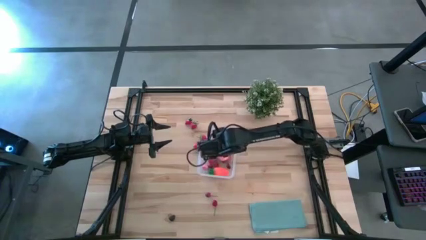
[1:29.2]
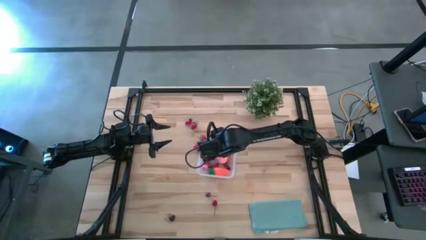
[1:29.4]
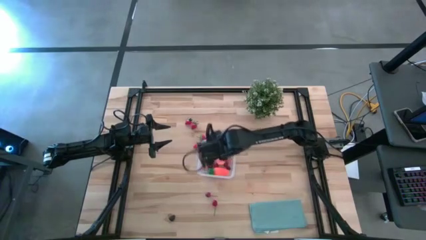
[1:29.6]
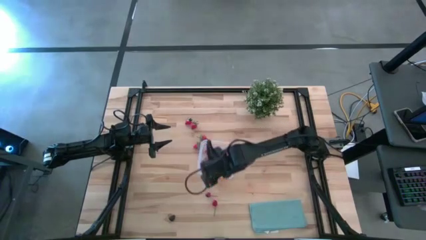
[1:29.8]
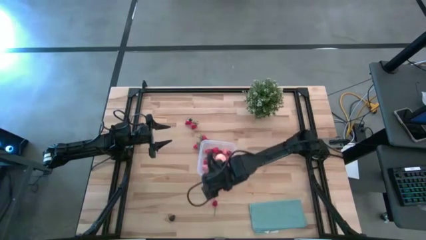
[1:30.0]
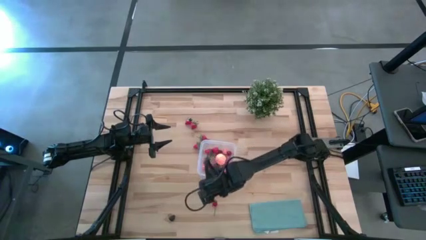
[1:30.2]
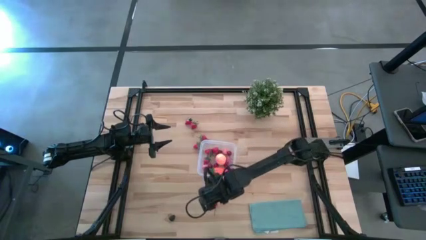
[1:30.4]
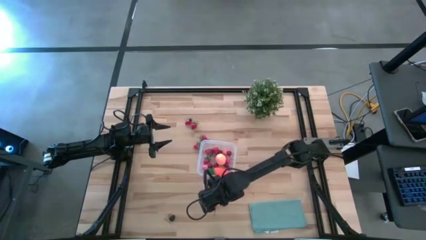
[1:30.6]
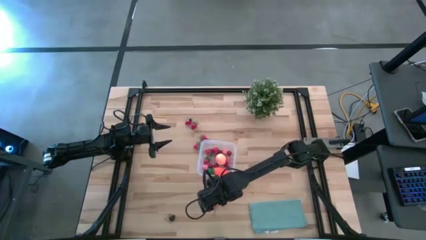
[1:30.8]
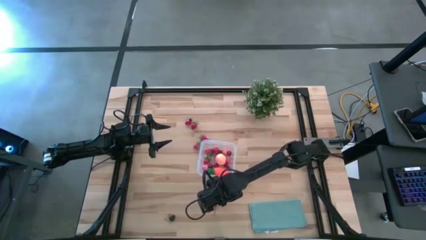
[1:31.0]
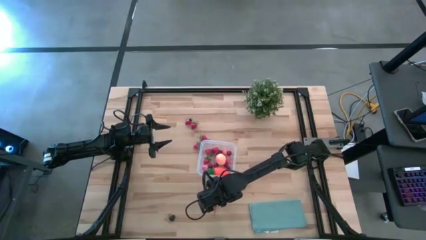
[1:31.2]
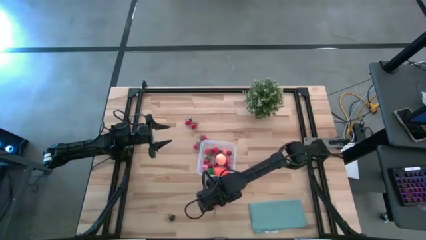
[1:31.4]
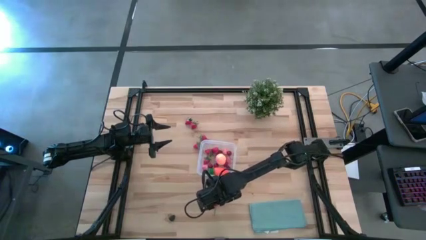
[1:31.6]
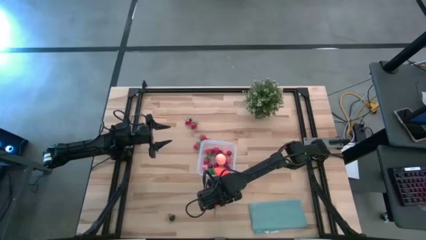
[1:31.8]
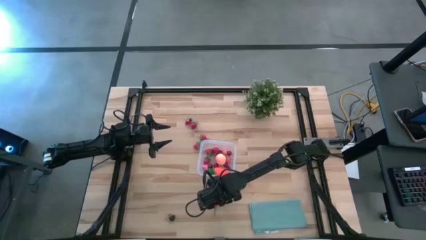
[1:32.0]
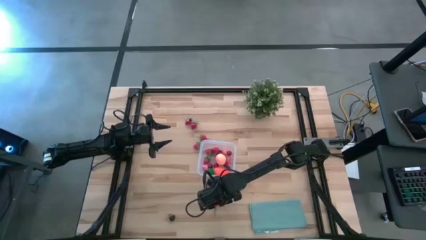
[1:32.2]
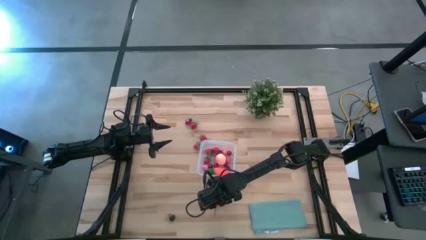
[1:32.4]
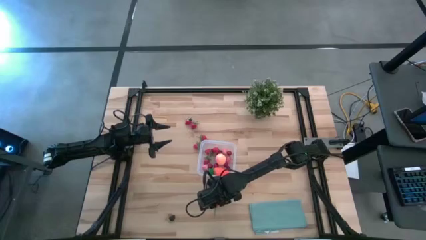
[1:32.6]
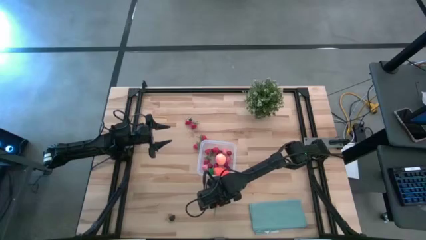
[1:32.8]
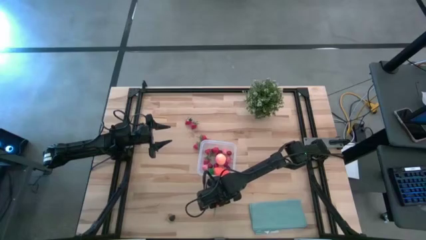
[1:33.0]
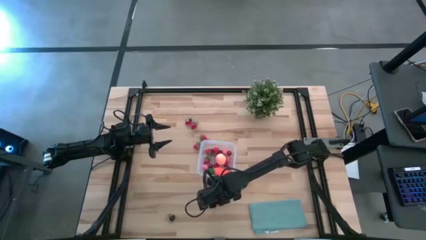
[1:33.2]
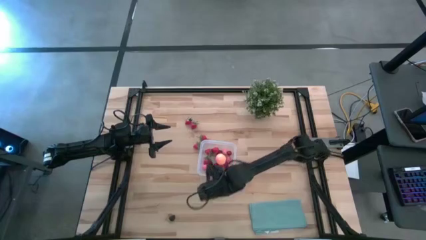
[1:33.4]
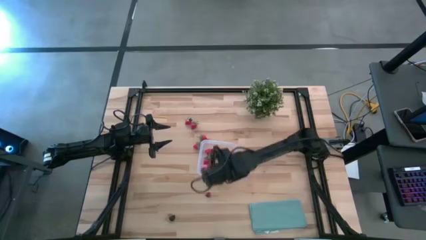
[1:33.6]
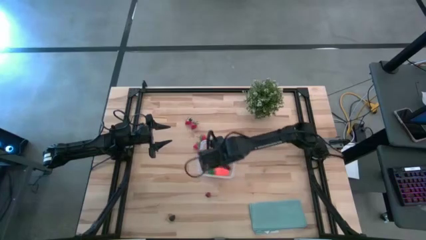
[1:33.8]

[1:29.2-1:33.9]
Task: Pick and placing Produce into tupperware
Put the cherry into the transparent bin

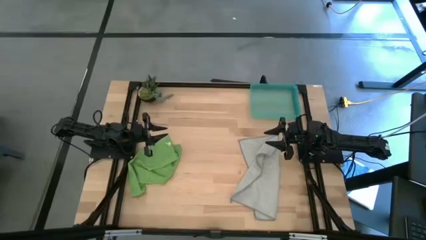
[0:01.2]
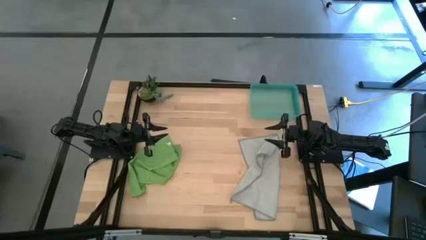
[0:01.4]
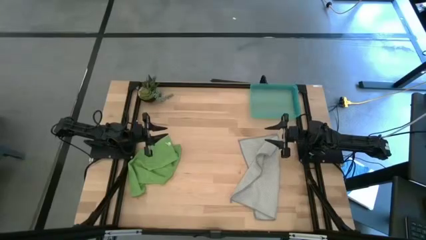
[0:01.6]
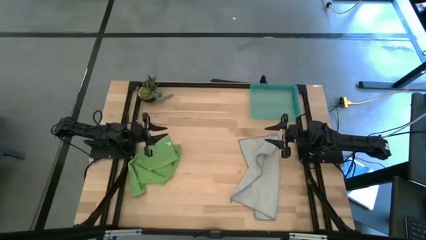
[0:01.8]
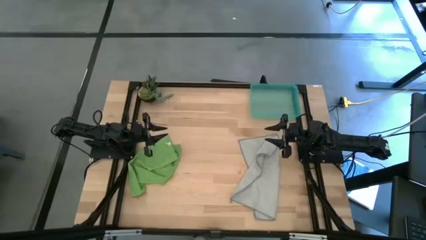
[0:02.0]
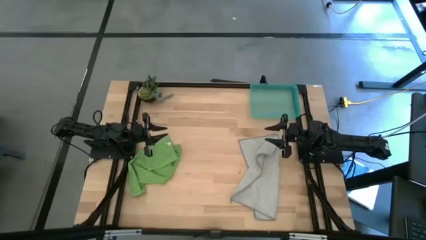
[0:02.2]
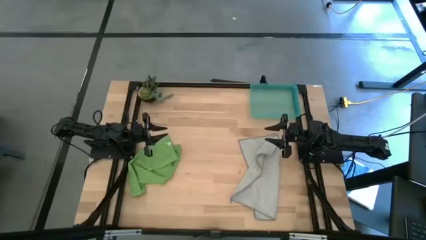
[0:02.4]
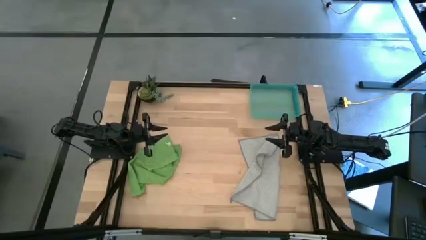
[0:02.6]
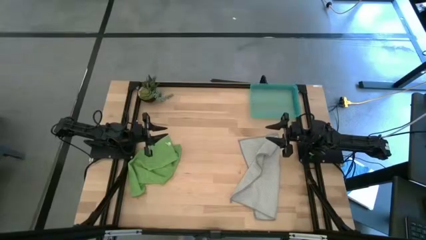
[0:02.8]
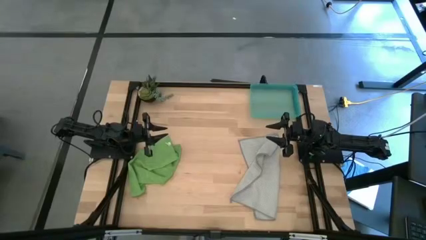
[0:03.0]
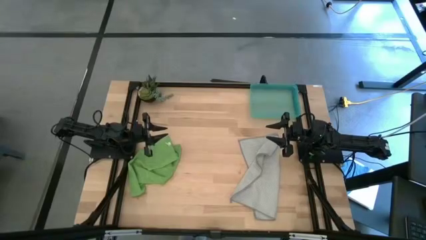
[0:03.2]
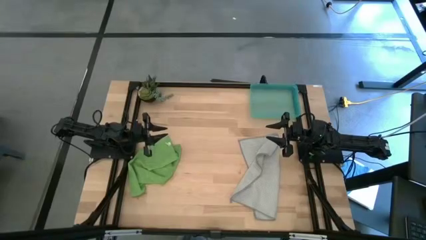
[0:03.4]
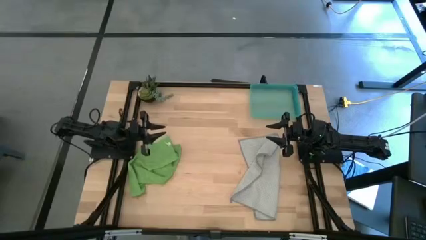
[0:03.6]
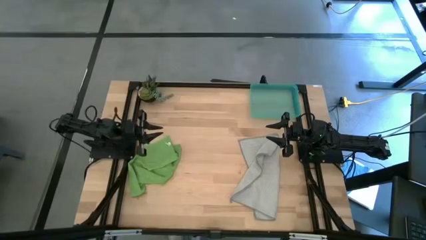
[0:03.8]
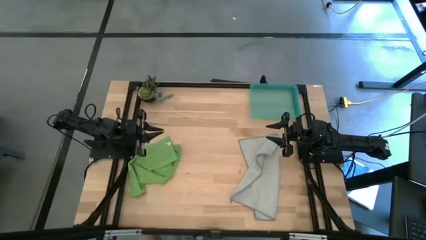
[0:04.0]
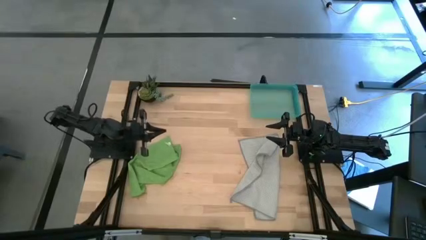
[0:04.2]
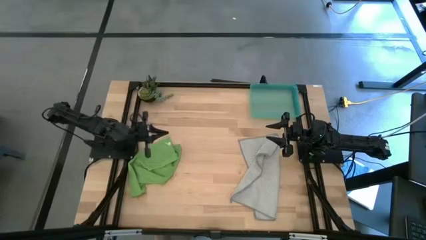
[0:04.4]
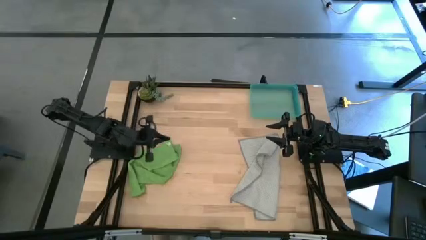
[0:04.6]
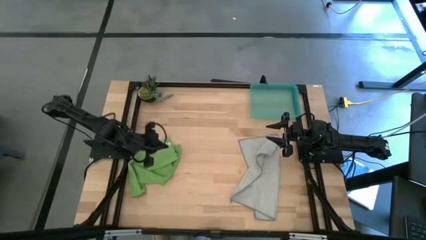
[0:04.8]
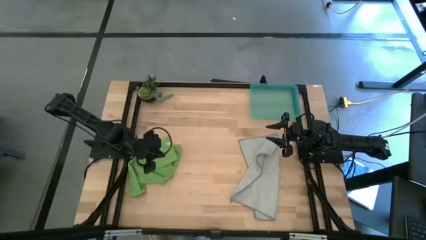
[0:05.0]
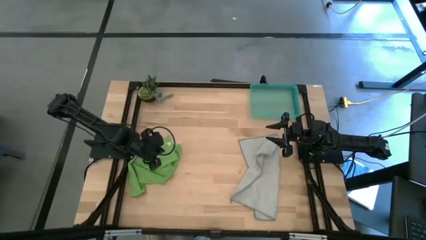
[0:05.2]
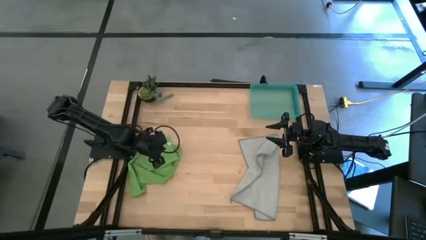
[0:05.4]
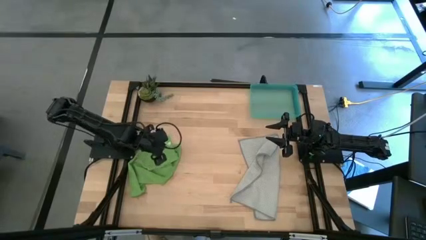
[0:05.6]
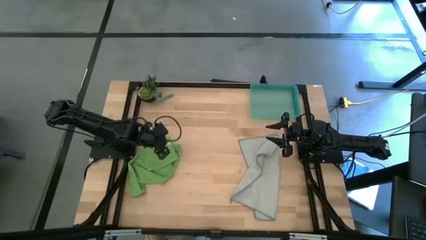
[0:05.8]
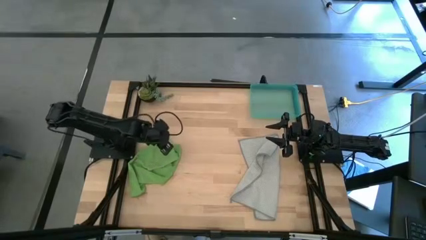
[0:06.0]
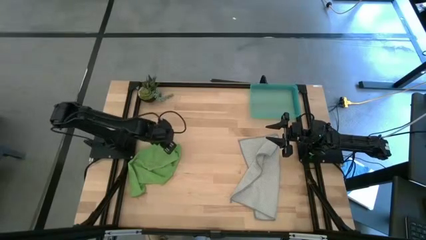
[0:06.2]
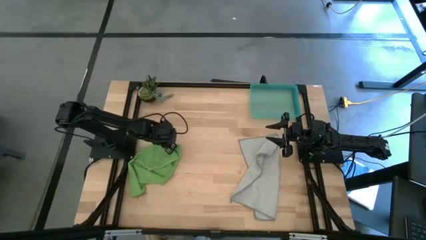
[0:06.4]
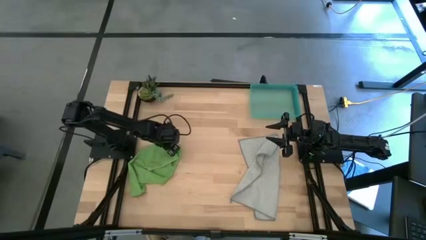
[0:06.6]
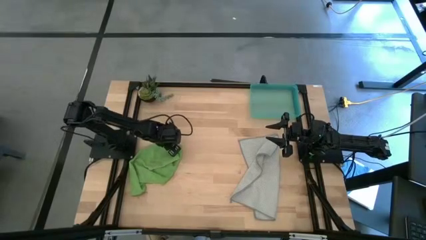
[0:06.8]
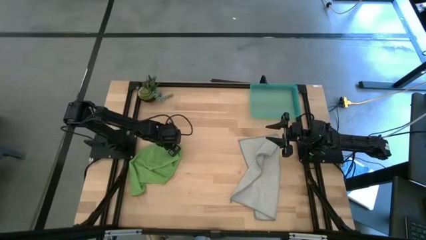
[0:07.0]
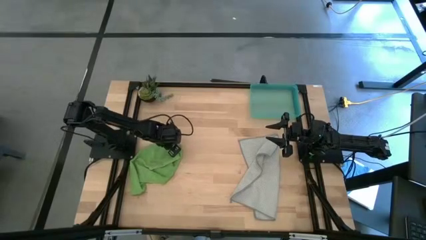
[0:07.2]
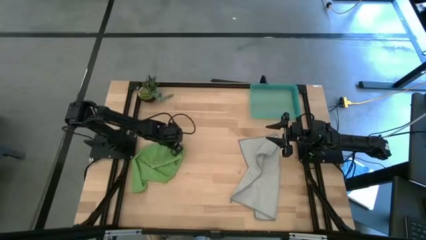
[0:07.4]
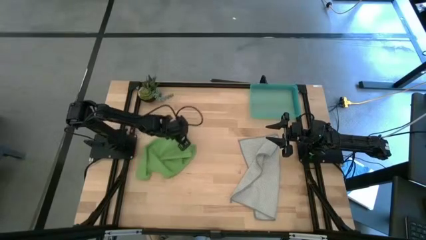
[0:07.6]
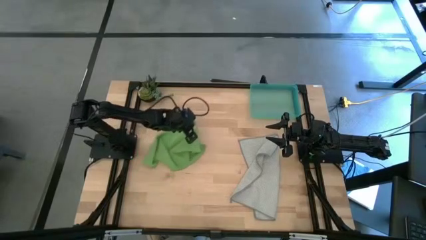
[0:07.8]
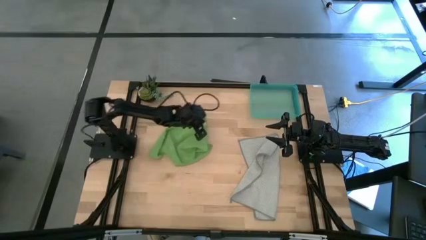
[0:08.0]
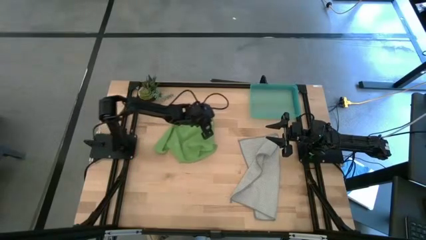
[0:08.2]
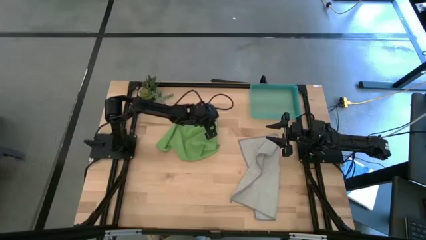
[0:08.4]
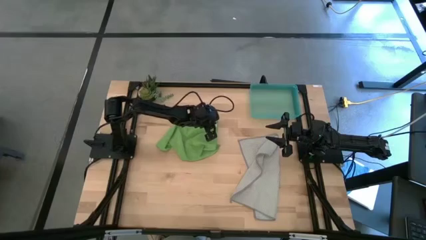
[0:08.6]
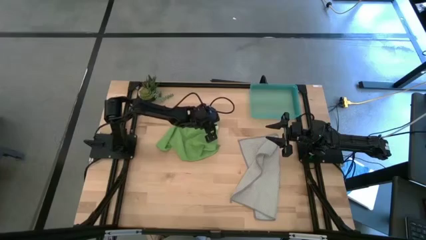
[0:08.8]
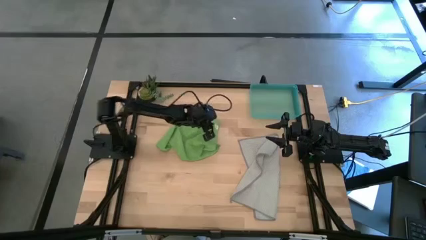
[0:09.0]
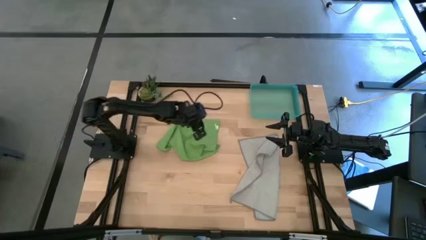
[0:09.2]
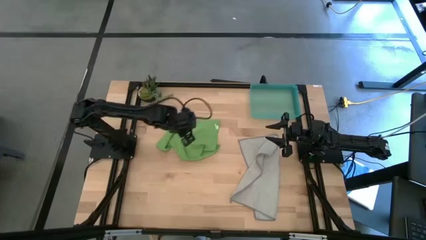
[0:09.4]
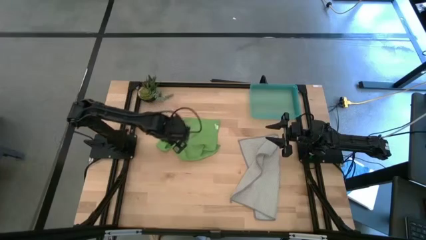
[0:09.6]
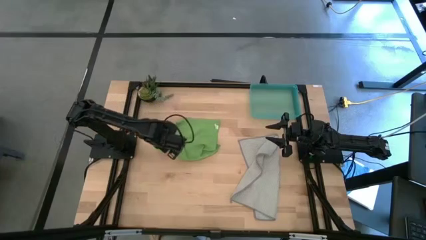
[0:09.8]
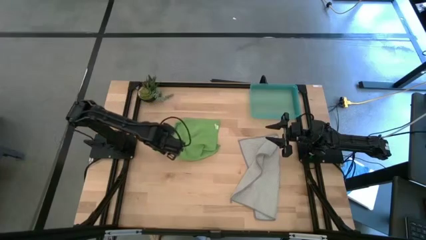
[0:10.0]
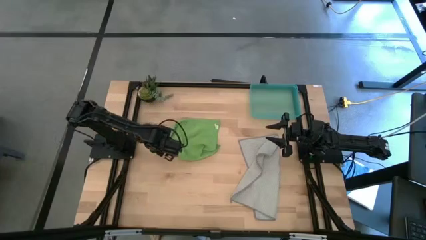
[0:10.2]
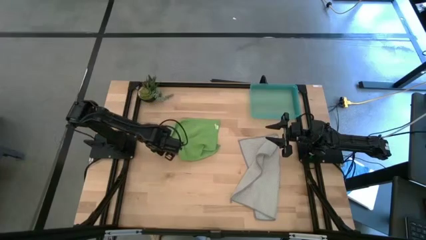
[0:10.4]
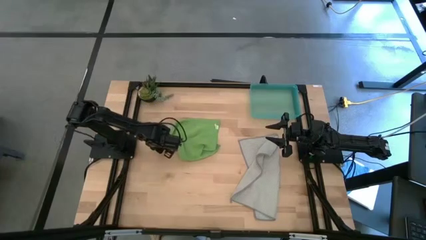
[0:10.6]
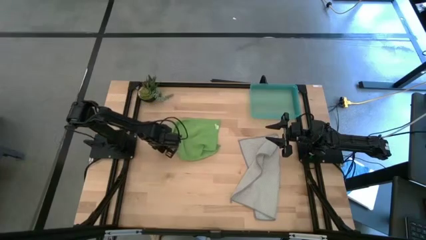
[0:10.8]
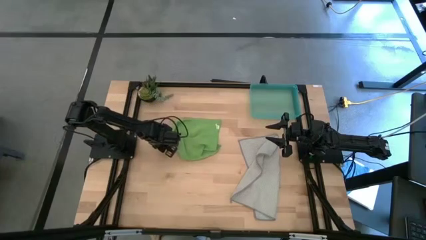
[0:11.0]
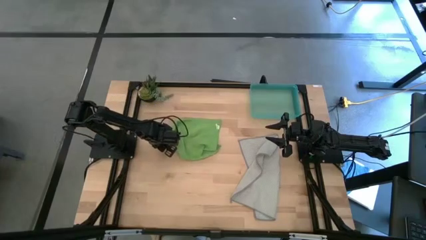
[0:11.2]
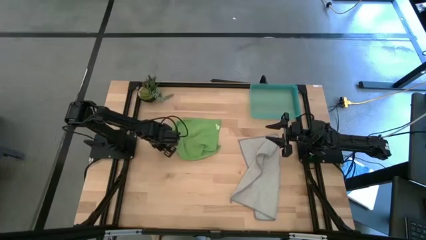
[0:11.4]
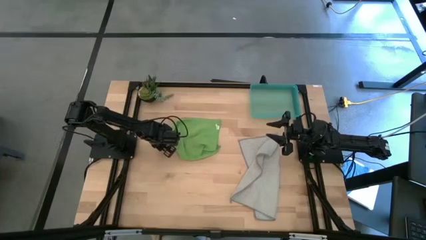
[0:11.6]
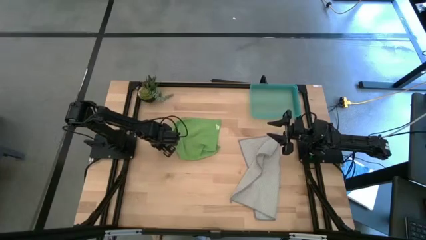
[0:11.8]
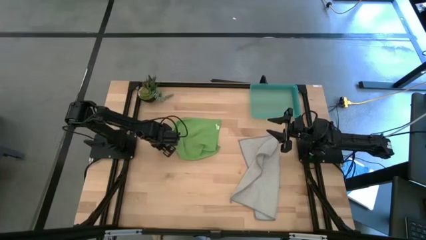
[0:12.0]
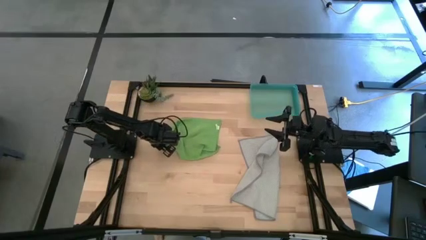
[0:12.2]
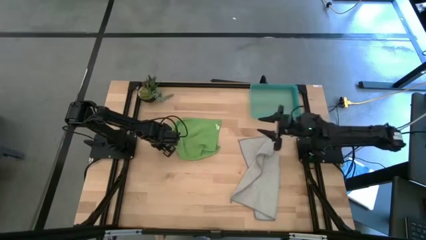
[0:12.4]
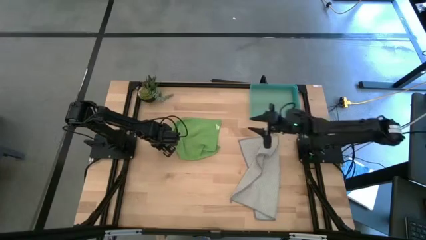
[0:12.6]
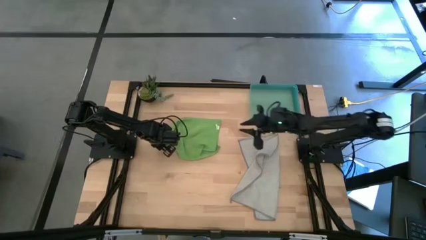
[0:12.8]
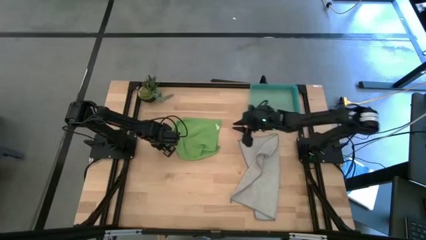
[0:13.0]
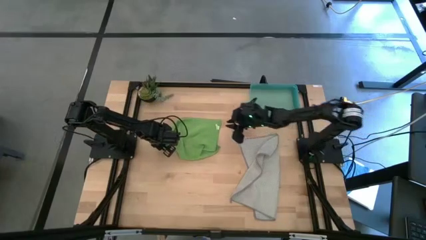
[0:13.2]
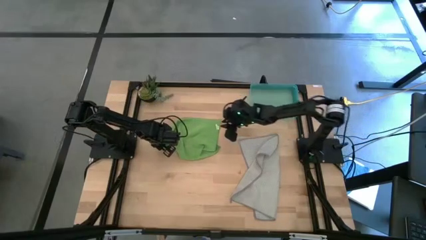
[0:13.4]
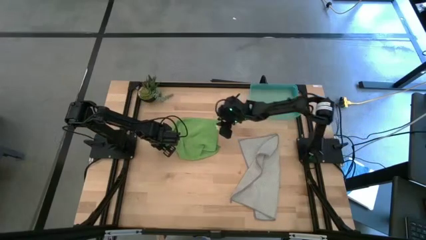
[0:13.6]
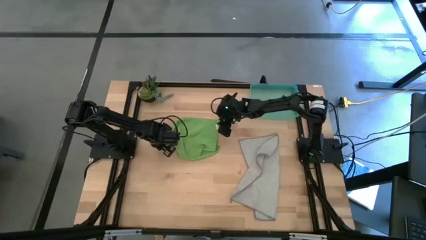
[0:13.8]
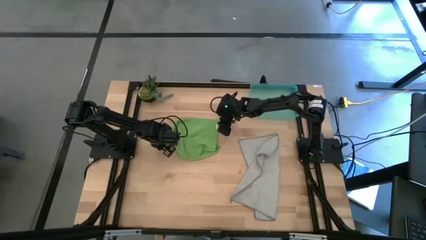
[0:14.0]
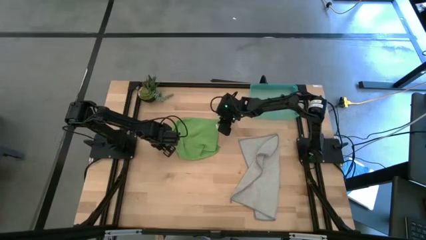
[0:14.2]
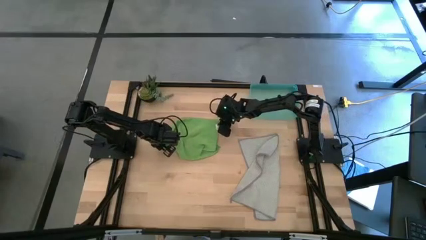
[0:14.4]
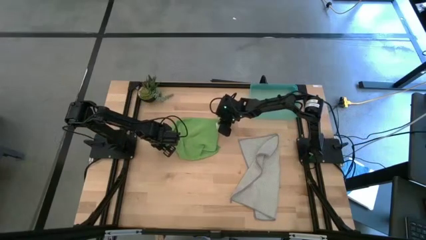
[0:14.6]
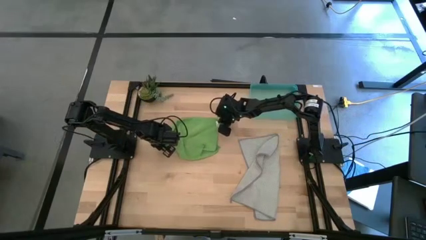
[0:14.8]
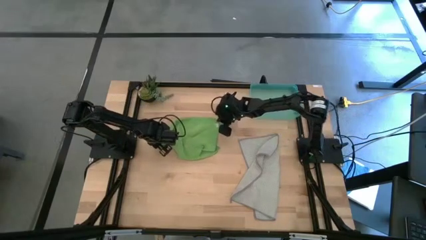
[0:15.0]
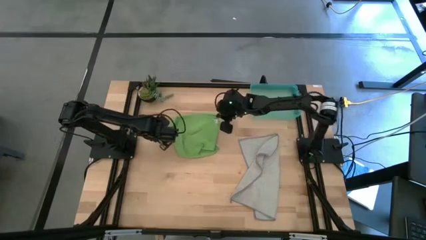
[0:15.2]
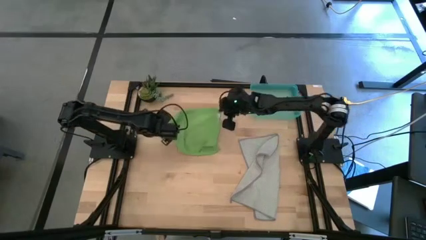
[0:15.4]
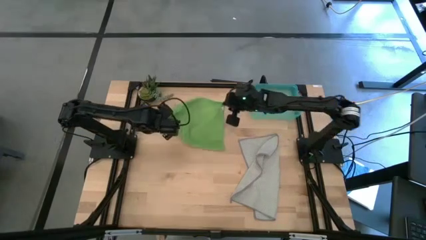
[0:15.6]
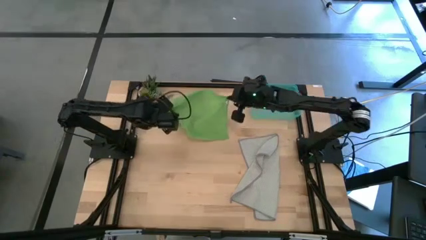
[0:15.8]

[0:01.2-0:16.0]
Task: Roll microfiber towels into tight, uniform cylinder then place into a basket
Fold the green microfiber cloth
